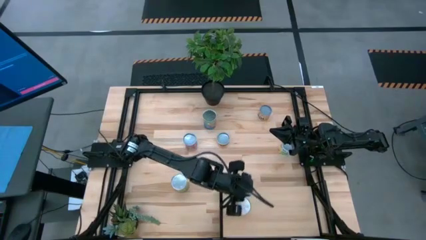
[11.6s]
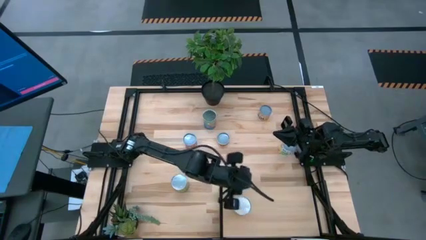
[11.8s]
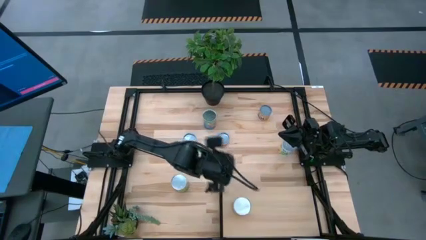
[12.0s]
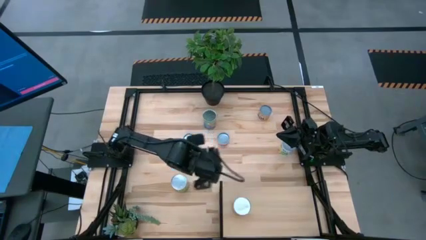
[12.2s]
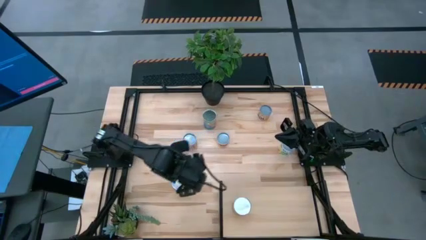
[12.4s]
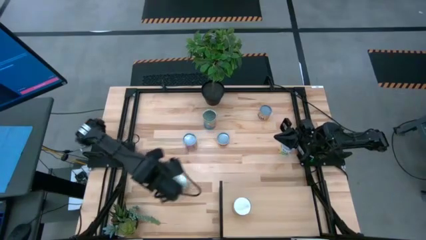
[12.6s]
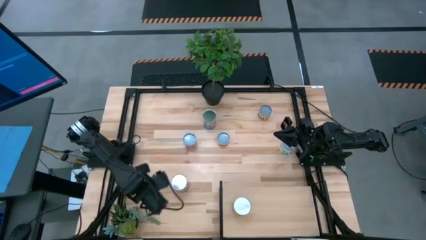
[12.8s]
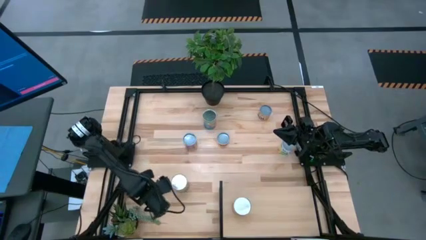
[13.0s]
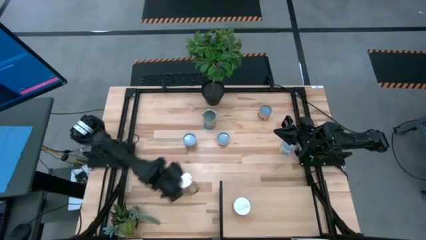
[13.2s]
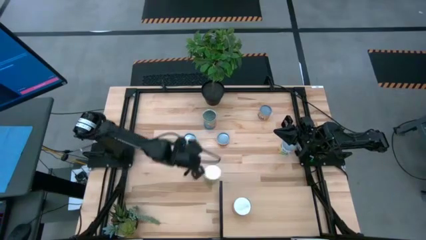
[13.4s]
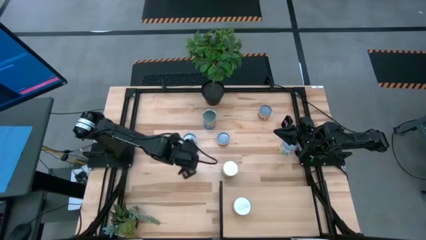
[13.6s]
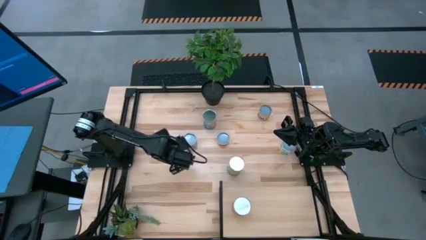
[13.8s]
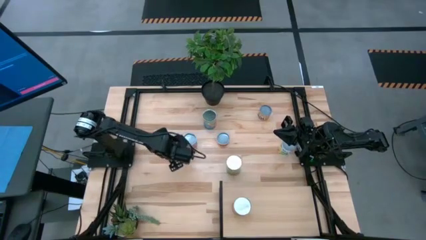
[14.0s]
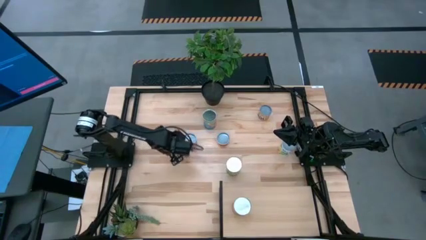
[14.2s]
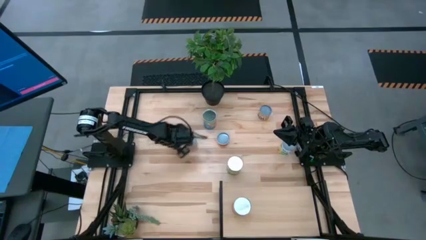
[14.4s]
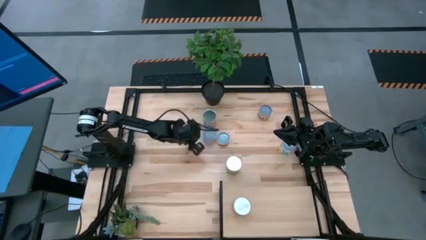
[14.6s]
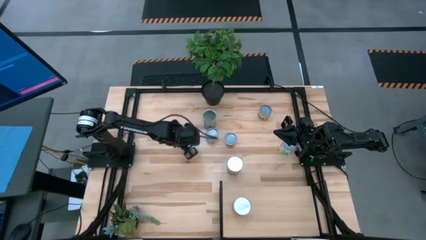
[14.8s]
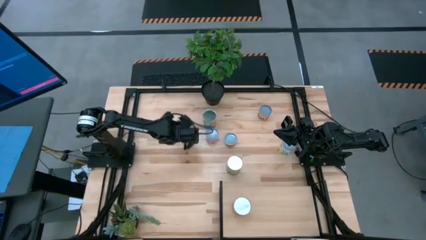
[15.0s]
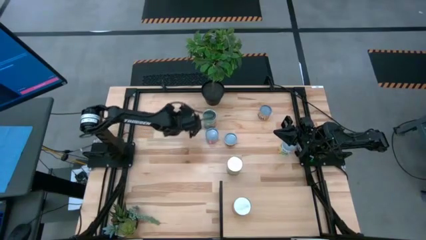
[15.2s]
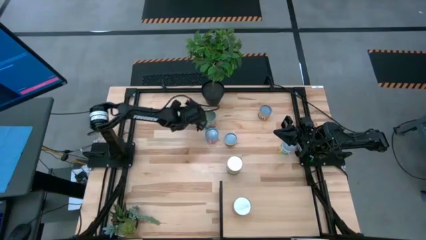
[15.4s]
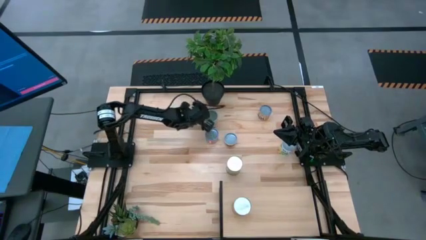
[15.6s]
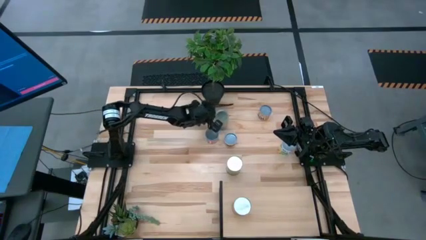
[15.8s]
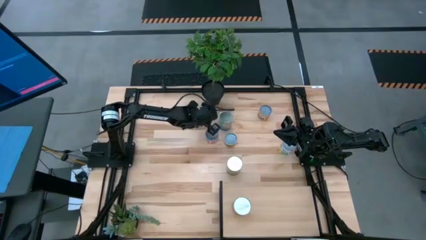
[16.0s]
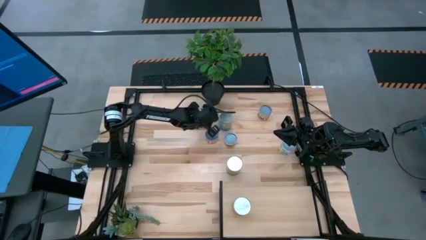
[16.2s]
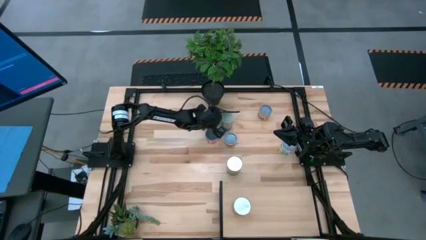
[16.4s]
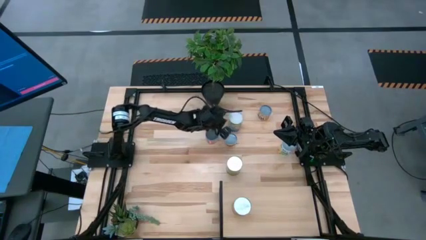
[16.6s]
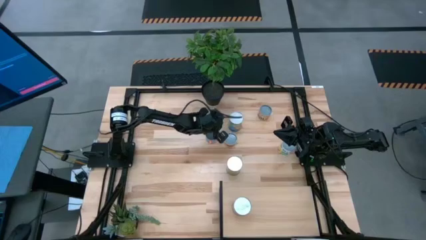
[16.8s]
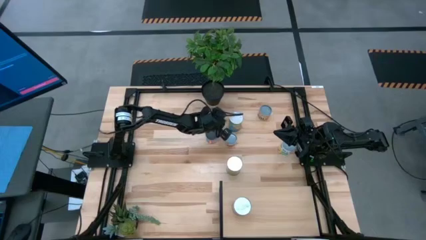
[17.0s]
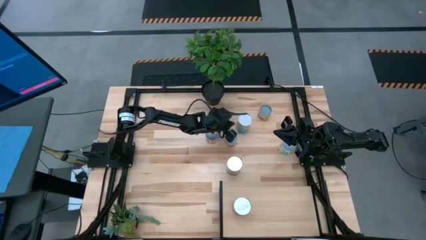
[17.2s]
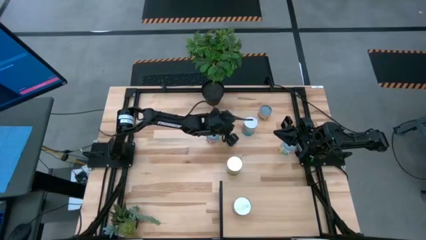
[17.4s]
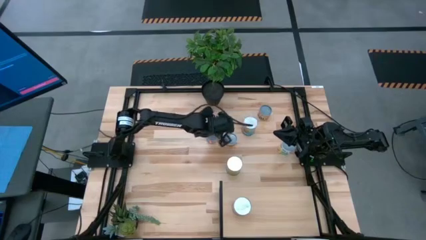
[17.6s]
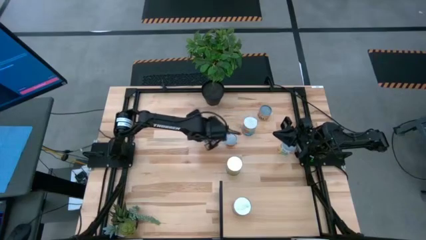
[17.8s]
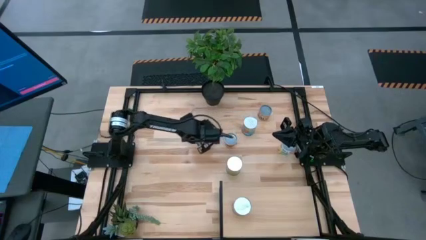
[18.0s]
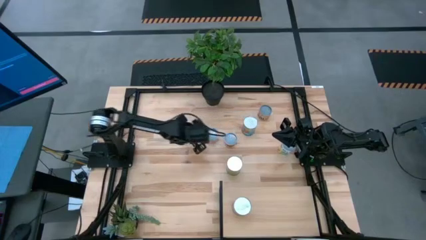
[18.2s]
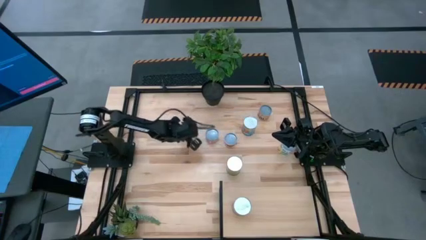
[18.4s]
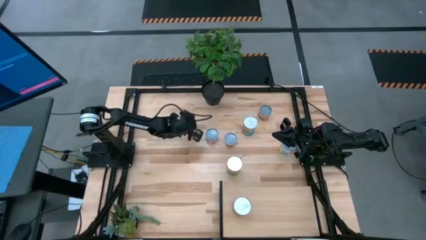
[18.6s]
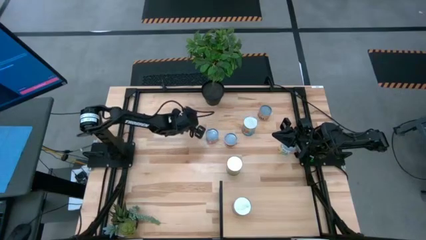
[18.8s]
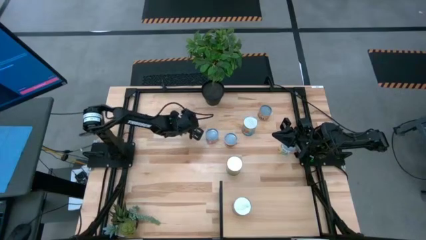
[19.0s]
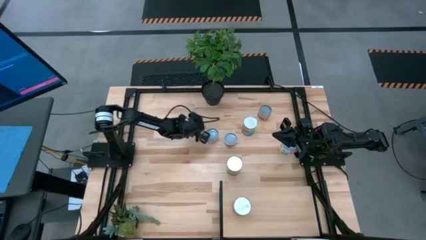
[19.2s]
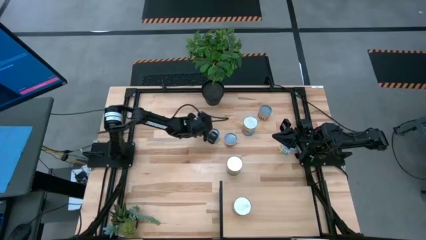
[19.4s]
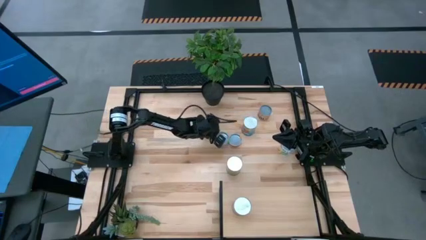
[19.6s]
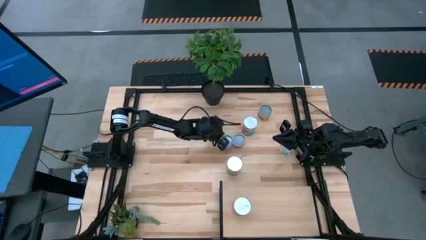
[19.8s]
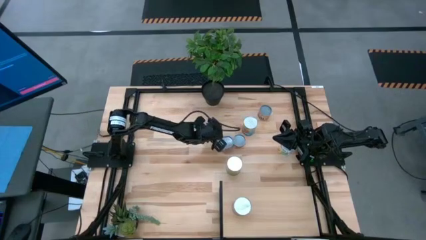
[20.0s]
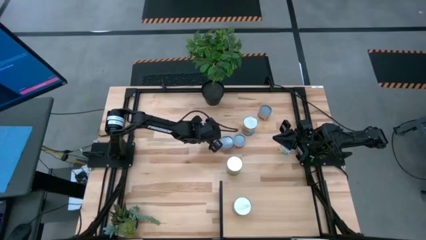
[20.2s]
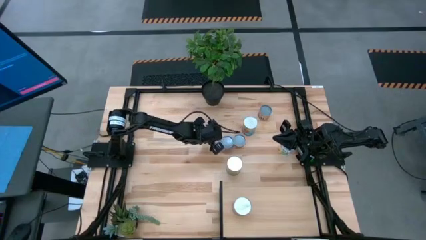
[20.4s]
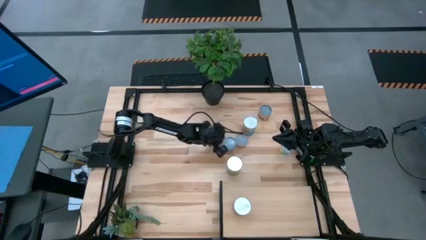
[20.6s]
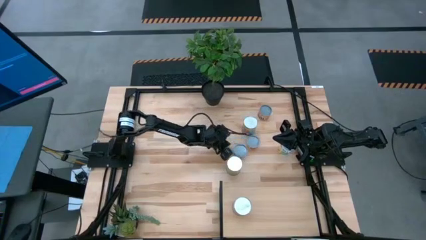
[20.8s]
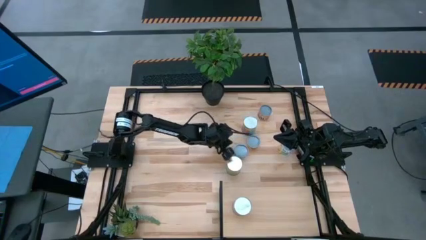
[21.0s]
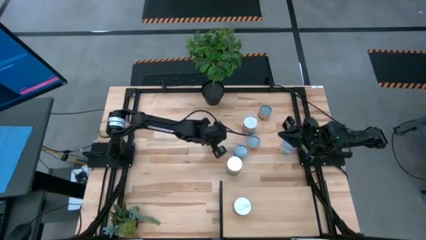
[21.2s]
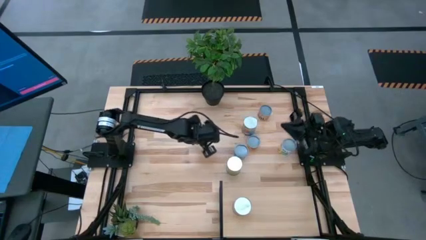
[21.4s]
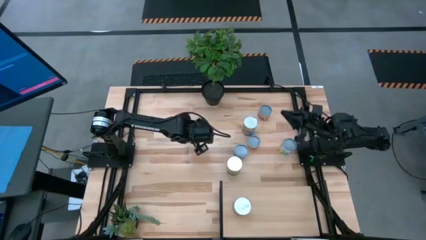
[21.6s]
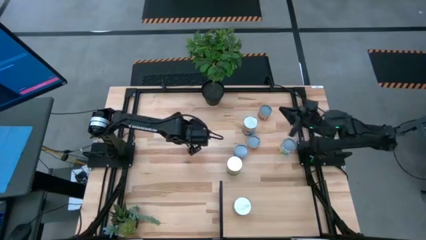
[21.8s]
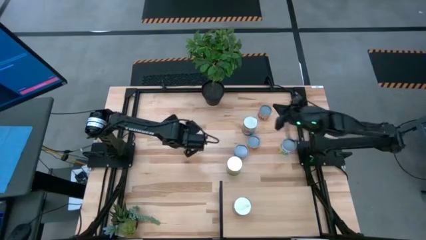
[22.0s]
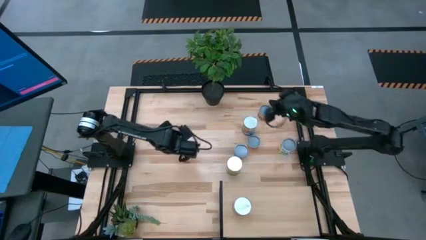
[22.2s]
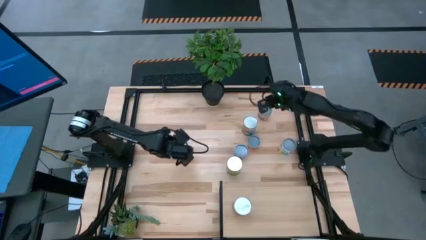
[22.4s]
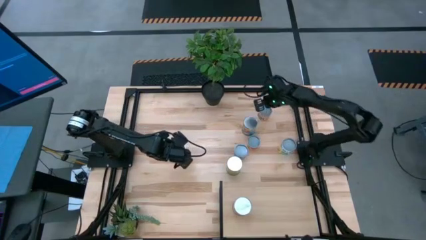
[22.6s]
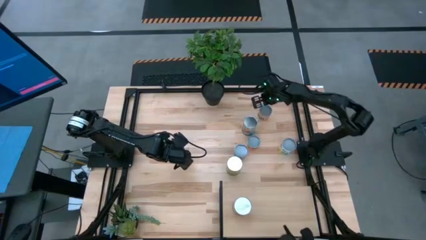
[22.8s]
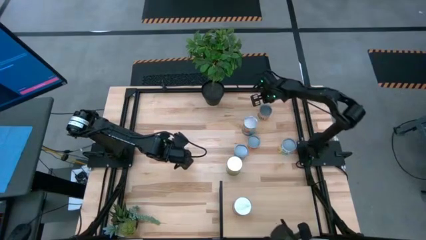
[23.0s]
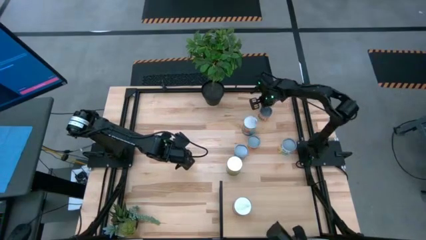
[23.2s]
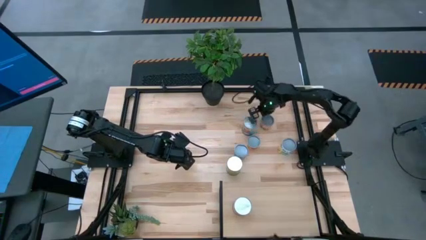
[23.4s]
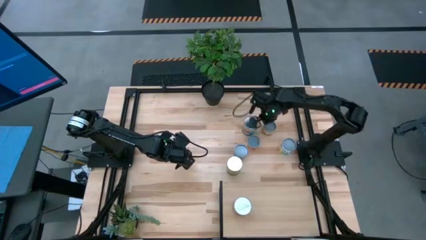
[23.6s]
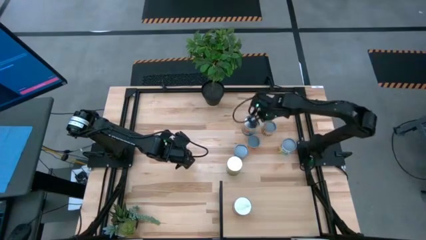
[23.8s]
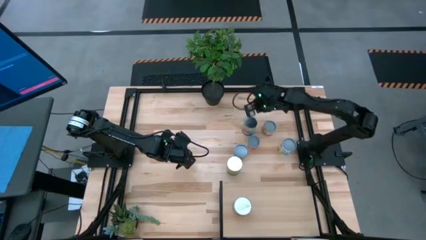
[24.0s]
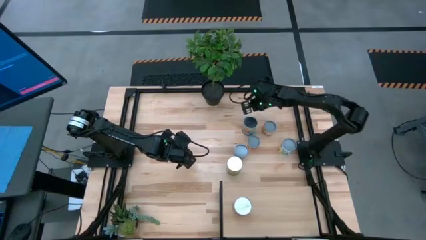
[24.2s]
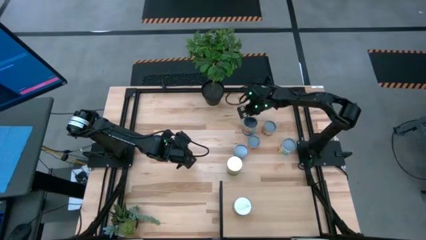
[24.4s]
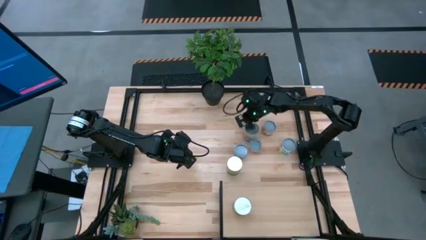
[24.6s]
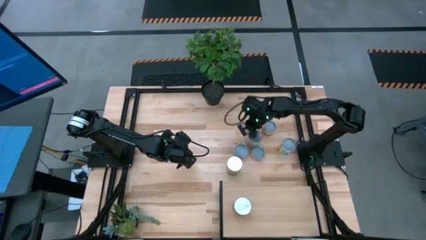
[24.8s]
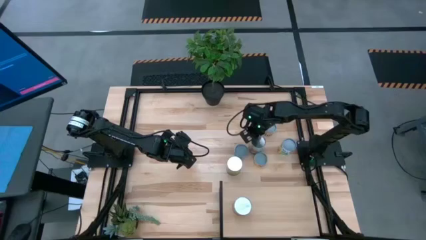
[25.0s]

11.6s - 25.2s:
Task: Pick and place cans onto a shelf
Move the cans to the middle right of the table

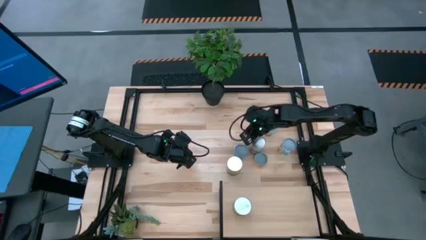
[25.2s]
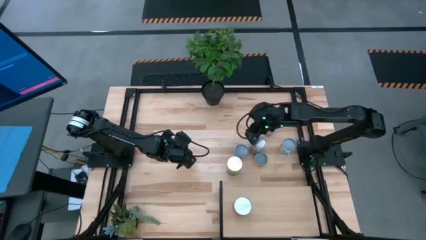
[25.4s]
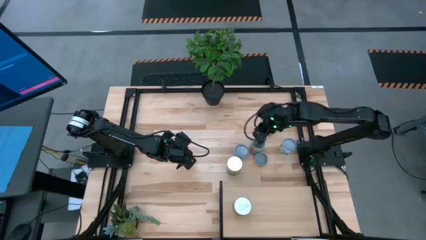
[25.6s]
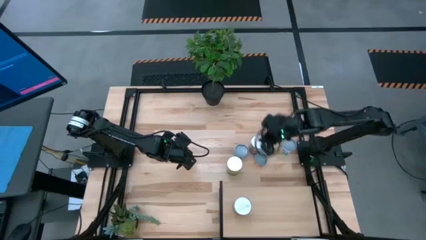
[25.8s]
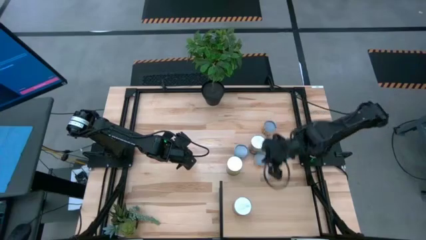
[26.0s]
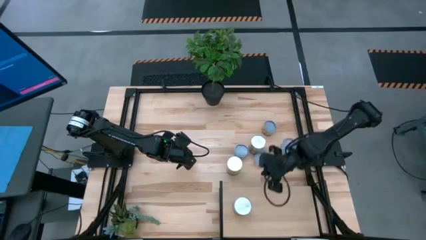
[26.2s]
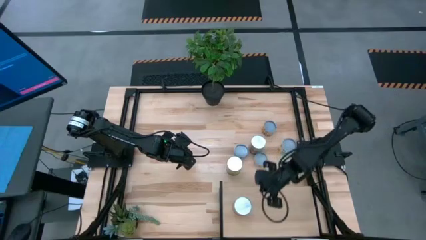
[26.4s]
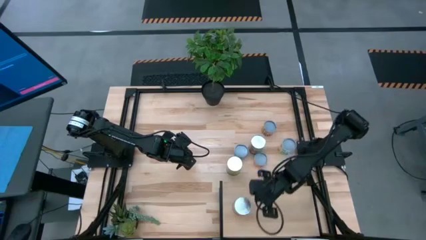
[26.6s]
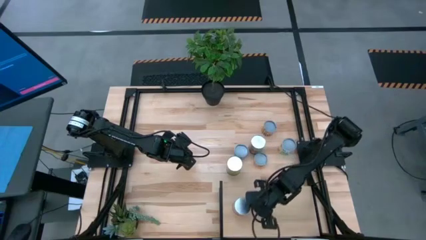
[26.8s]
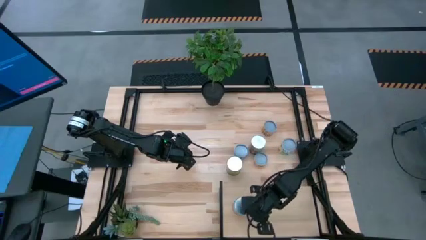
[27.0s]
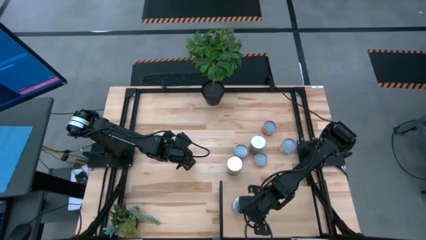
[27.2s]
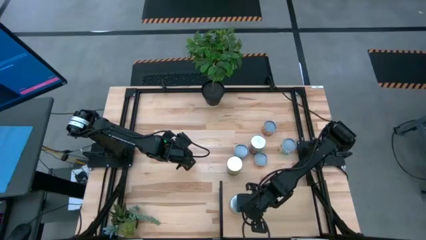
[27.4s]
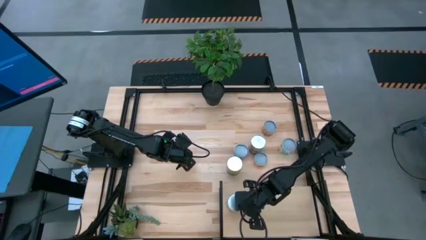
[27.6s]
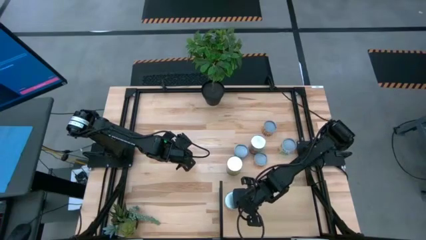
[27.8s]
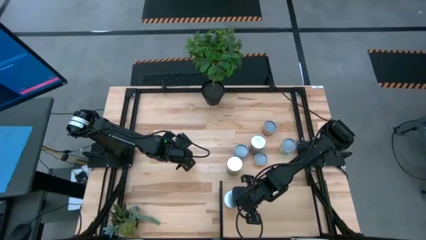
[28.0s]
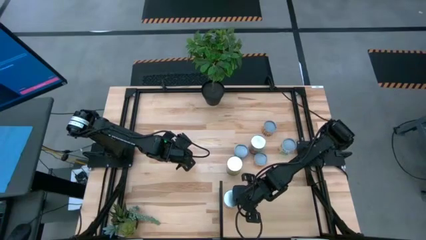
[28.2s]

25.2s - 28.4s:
Adjust the canned green beans on the shelf
